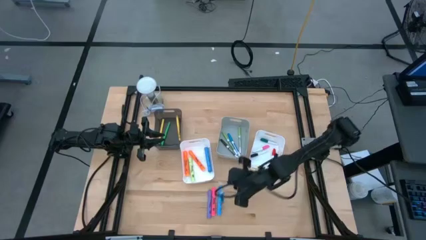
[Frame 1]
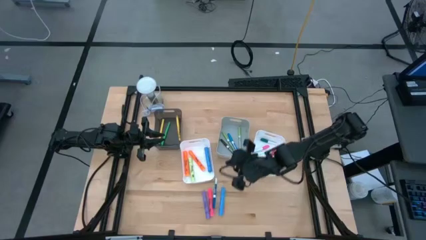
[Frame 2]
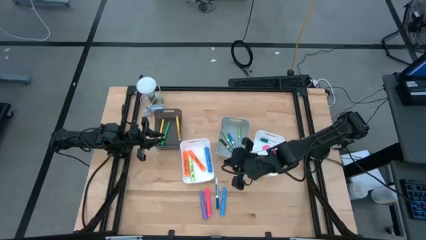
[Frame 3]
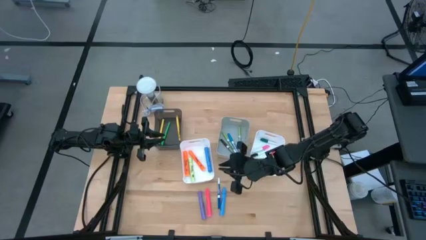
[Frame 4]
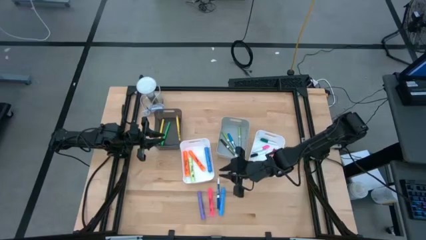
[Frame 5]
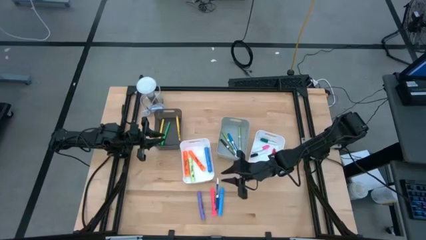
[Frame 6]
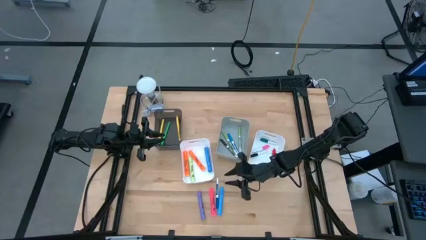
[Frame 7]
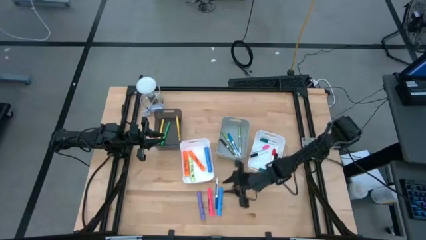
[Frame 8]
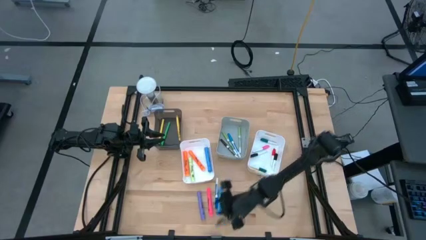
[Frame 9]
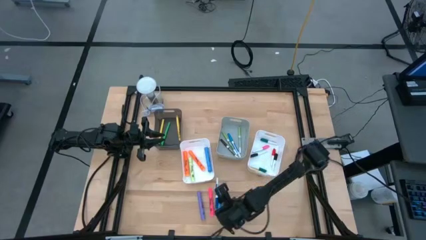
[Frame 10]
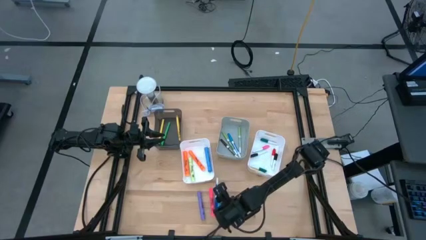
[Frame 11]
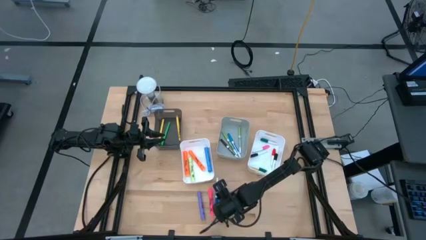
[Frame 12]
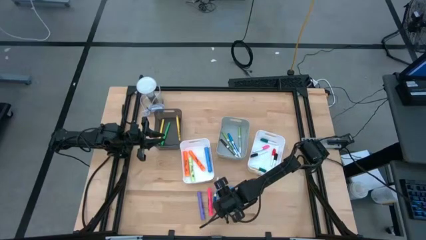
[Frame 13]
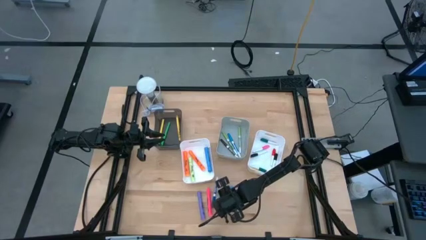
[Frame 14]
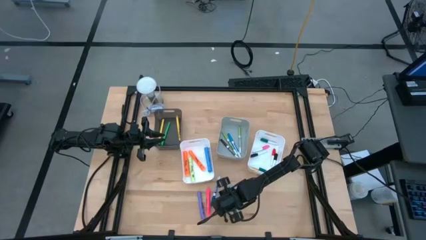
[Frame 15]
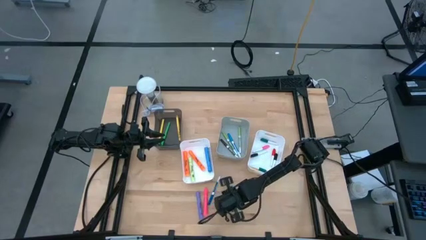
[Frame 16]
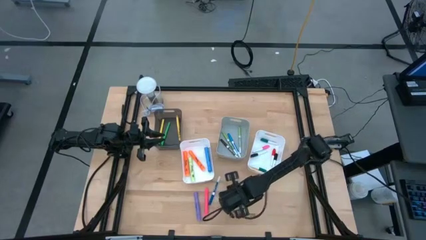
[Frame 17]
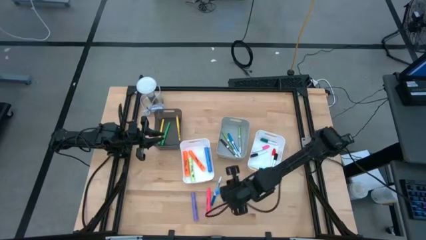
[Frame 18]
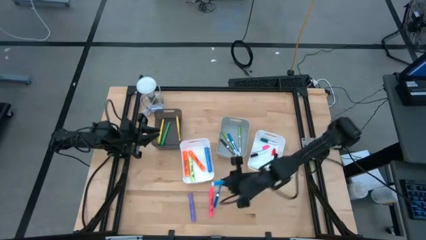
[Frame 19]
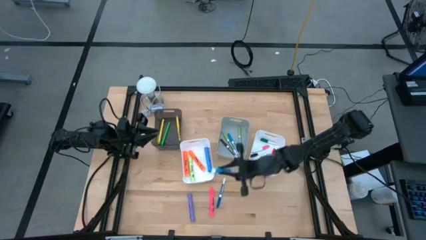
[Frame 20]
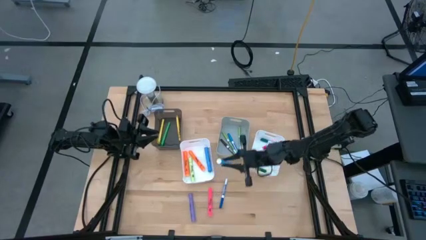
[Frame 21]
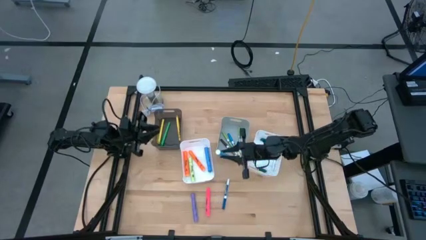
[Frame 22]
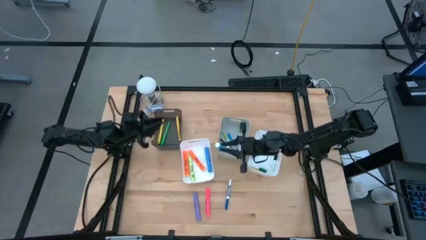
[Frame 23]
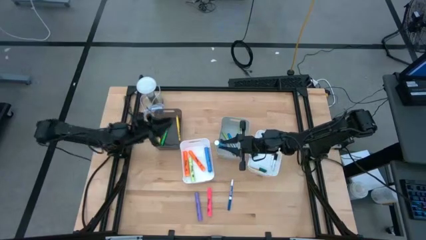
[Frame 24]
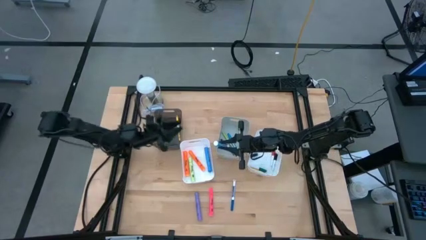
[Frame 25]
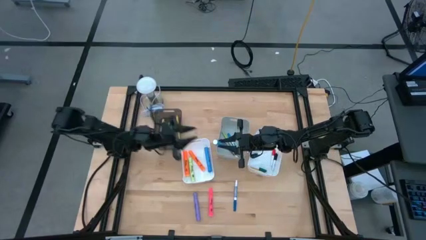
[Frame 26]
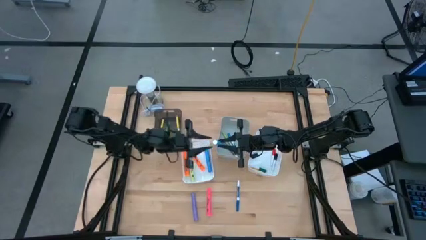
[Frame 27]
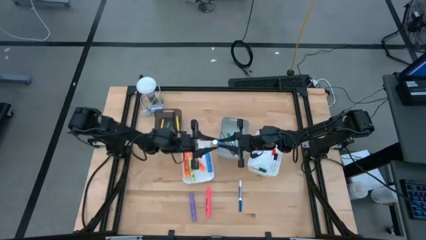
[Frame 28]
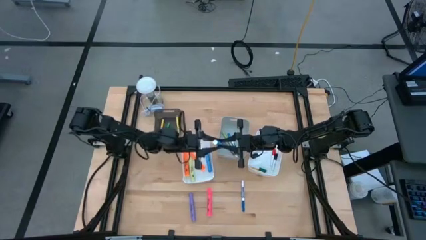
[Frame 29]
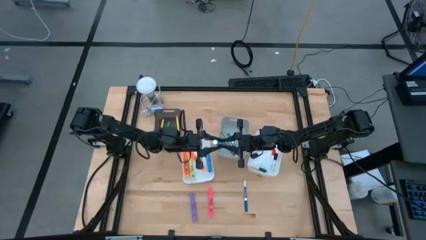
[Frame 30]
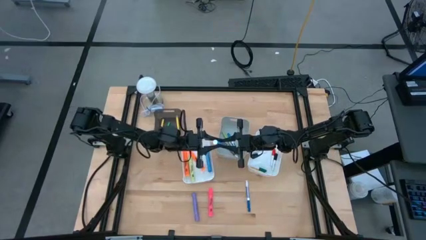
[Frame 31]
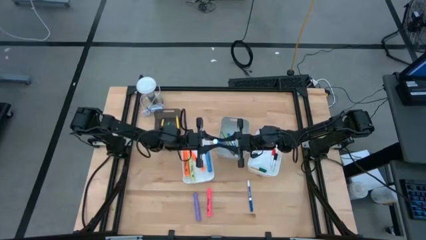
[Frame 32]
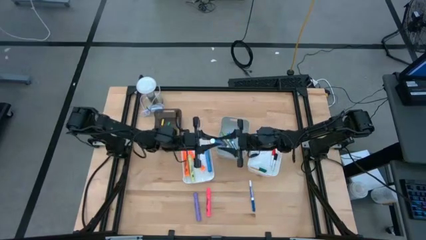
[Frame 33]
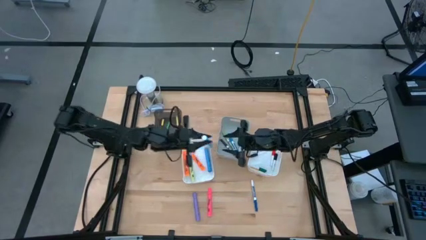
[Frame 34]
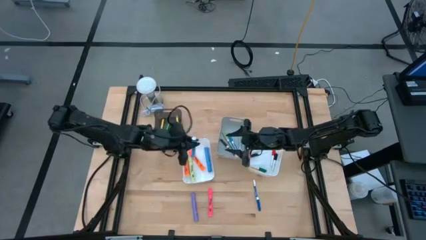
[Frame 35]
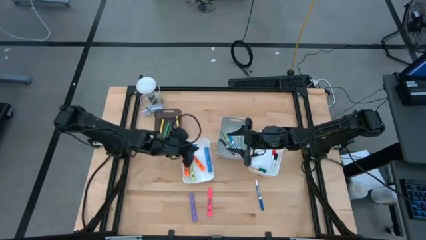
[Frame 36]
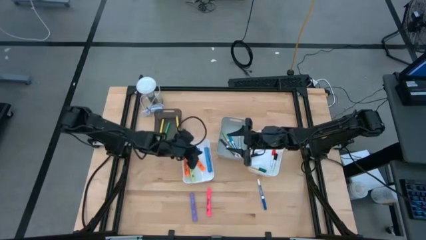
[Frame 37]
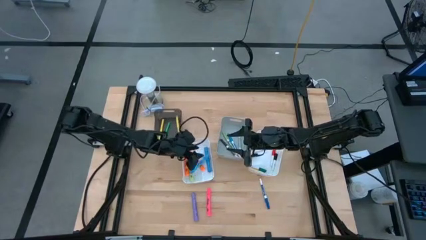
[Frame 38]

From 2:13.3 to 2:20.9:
Task: Pick & Place Markers
Put the blue highlighter into the left white bin

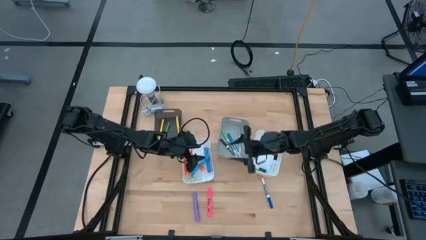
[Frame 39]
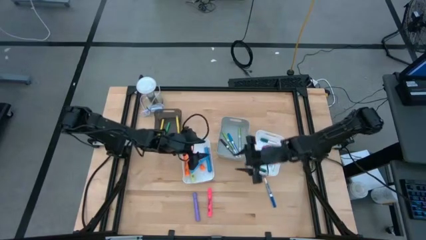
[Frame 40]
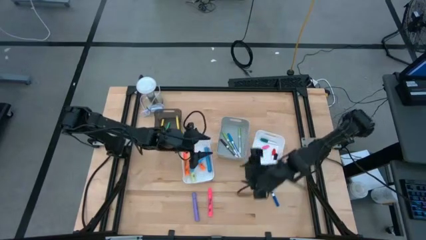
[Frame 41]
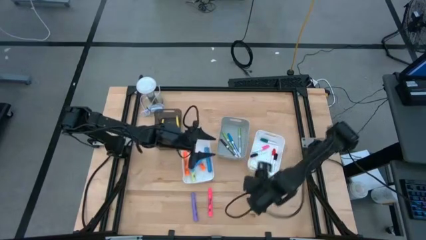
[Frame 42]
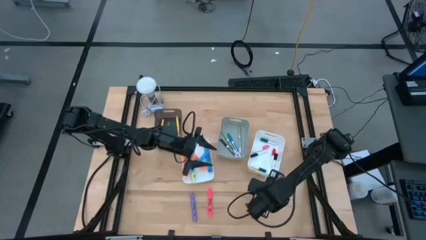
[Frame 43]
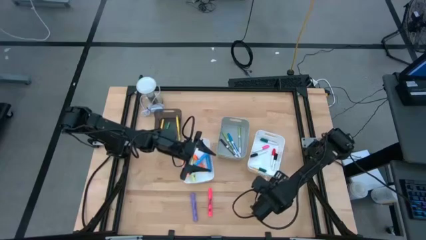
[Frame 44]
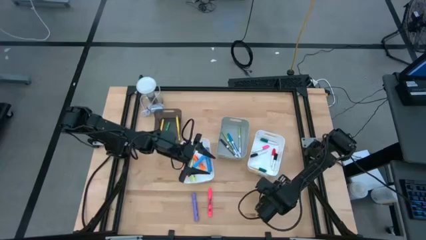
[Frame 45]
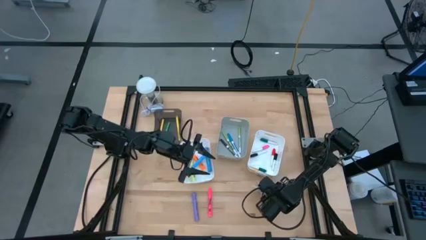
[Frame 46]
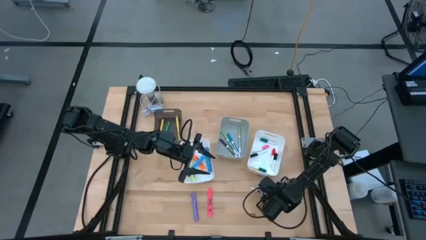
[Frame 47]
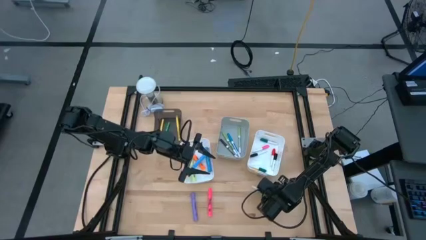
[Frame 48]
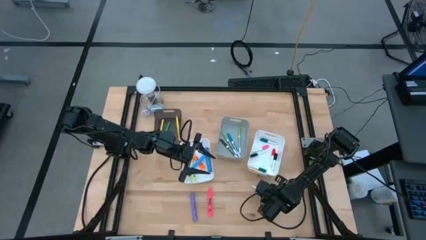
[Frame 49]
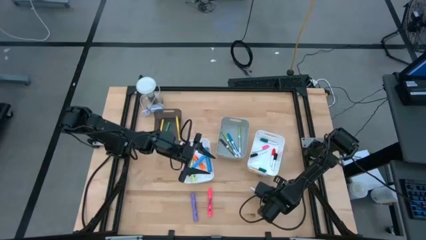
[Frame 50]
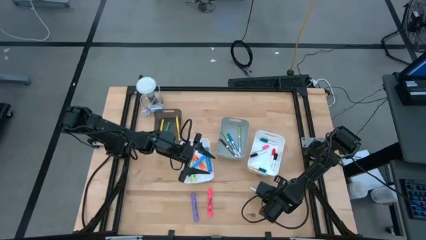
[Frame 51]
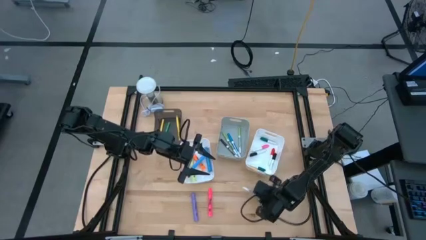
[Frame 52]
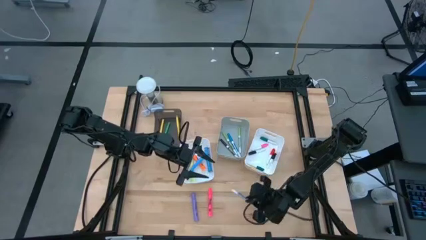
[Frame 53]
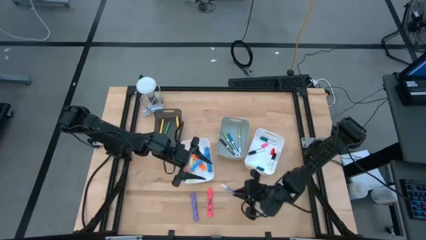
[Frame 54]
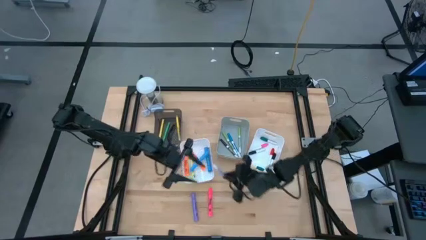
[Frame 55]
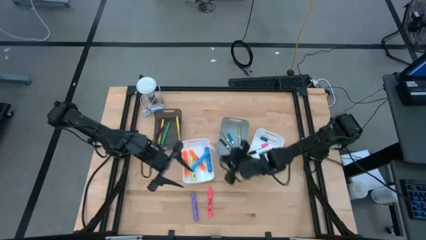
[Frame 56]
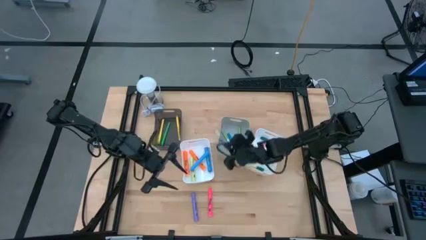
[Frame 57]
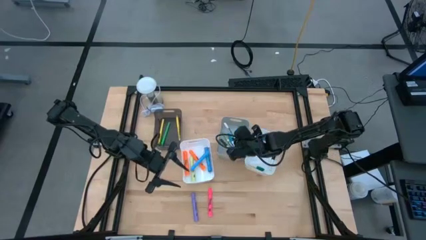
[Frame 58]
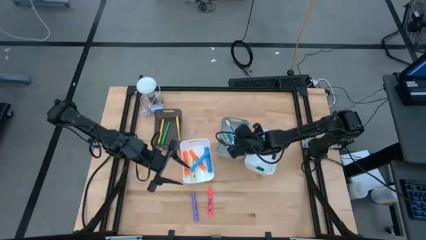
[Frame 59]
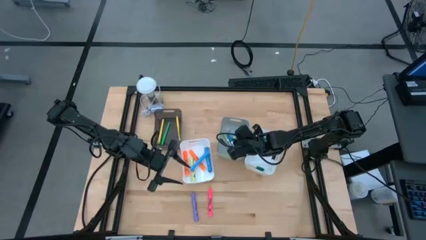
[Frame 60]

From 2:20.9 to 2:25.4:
Put the blue dry erase marker into the gray bin

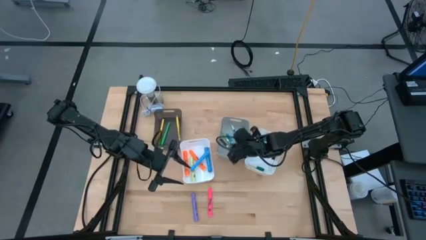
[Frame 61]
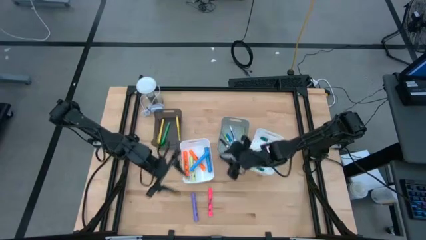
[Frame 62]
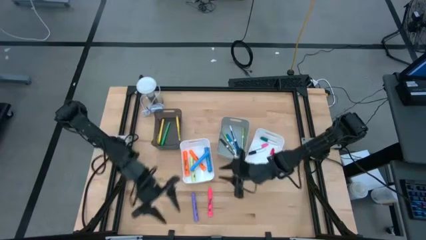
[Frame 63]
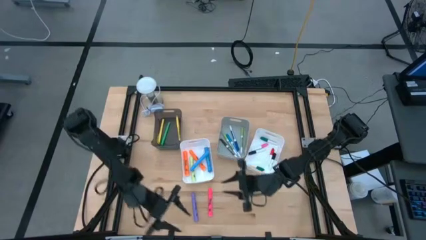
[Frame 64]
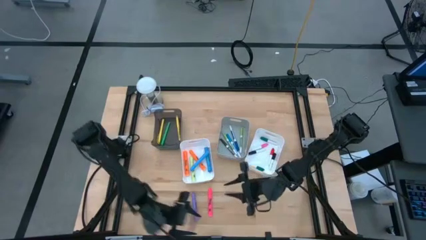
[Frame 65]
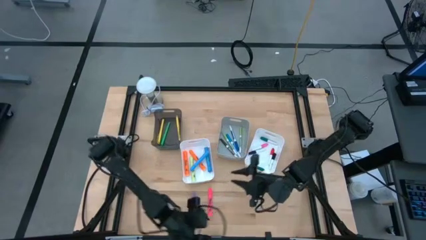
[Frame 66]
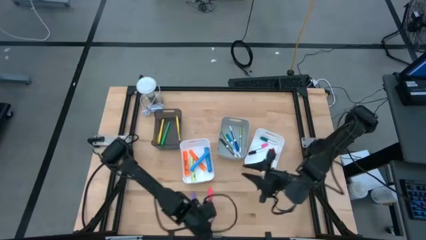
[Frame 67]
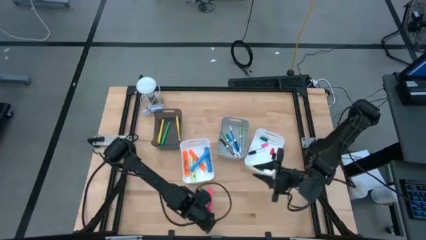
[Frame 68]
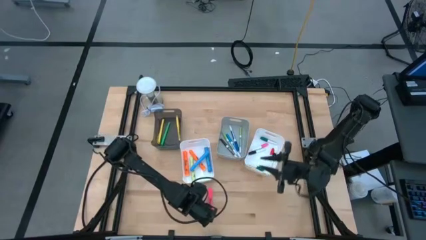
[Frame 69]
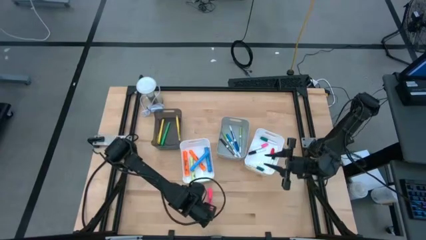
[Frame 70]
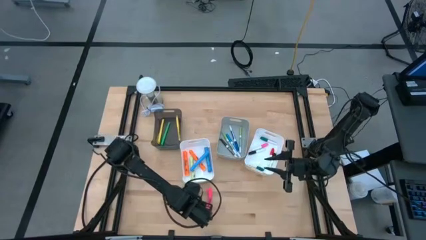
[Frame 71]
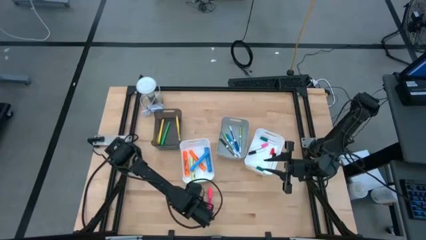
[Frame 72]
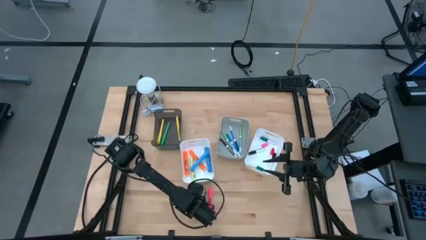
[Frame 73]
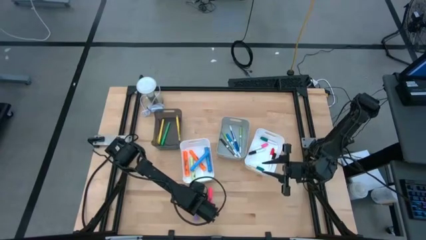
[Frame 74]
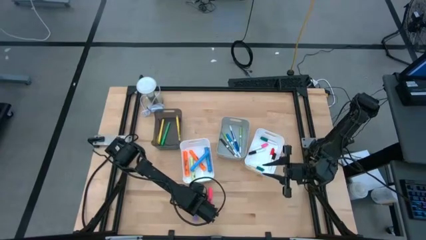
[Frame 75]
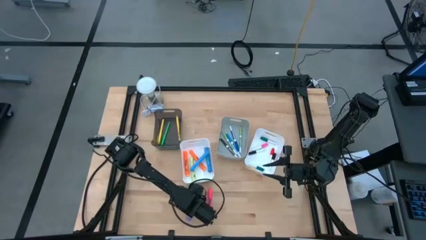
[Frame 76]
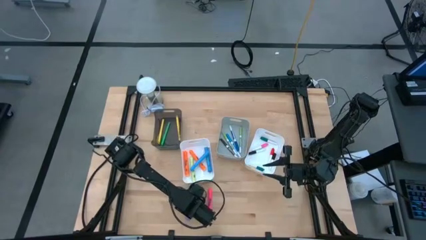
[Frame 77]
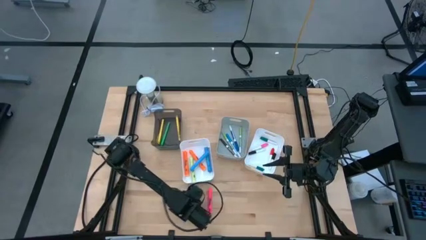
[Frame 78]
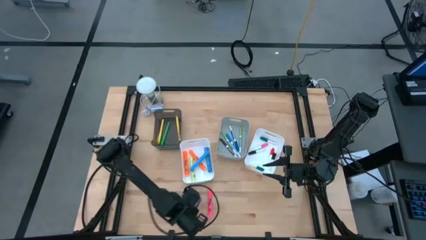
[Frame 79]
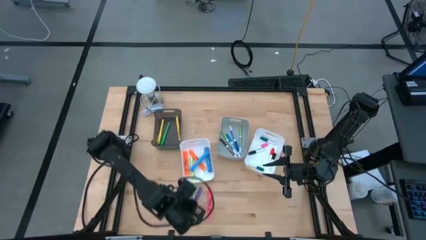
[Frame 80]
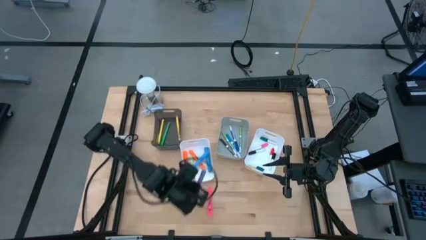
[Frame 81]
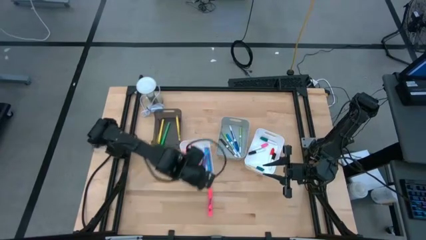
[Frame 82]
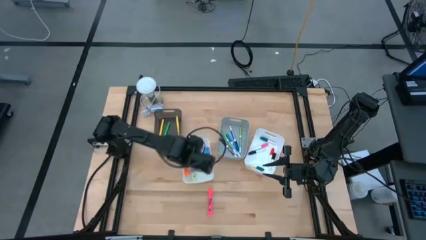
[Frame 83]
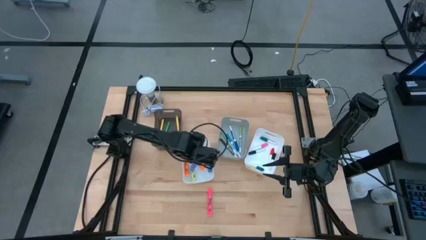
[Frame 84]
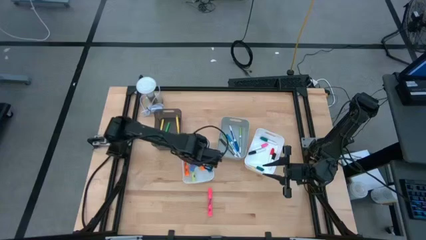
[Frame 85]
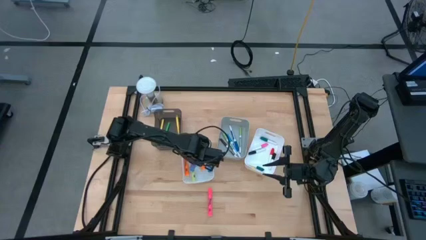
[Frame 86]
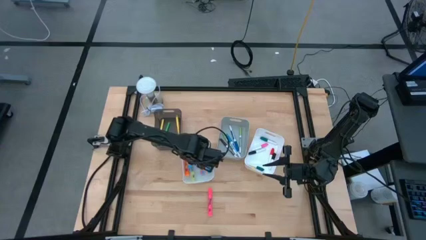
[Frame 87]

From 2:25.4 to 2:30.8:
Put the purple highlighter into the left white bin
